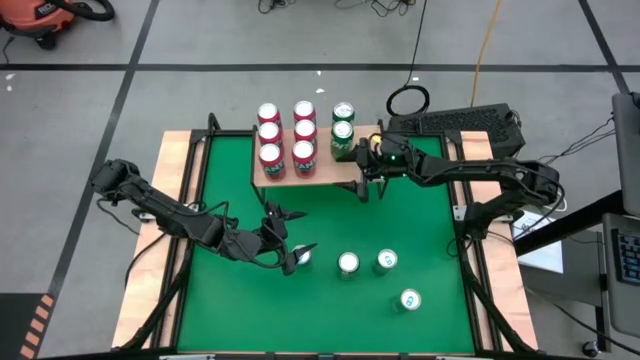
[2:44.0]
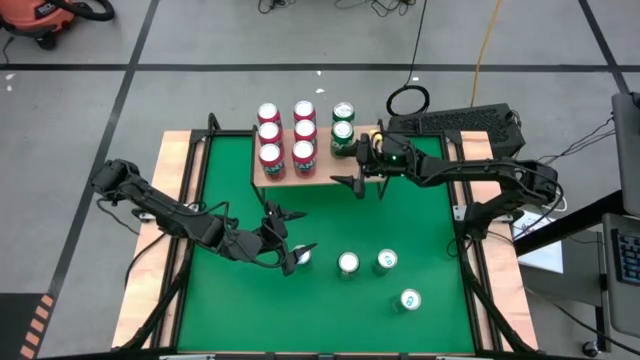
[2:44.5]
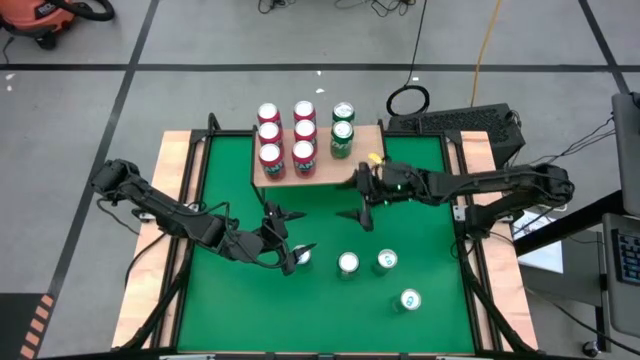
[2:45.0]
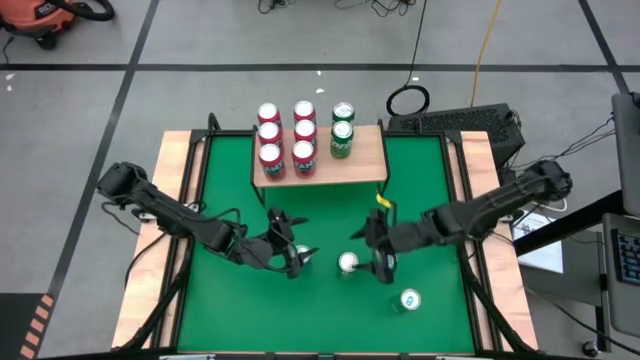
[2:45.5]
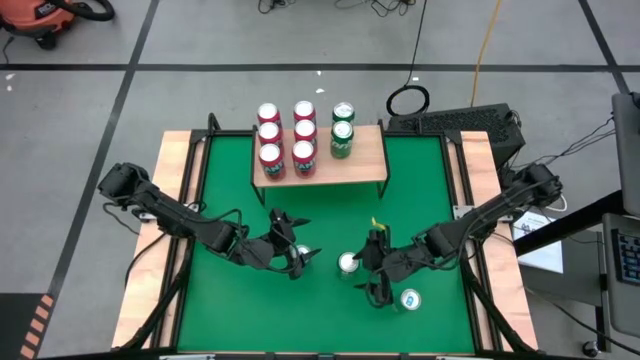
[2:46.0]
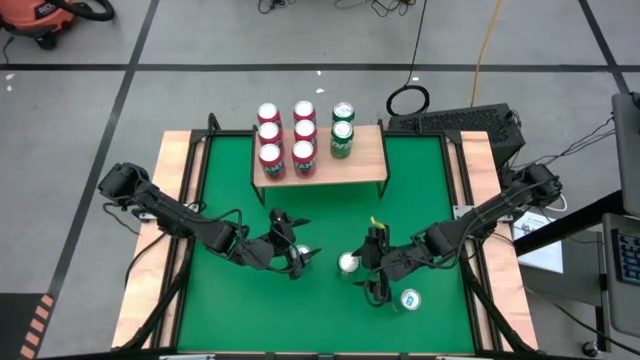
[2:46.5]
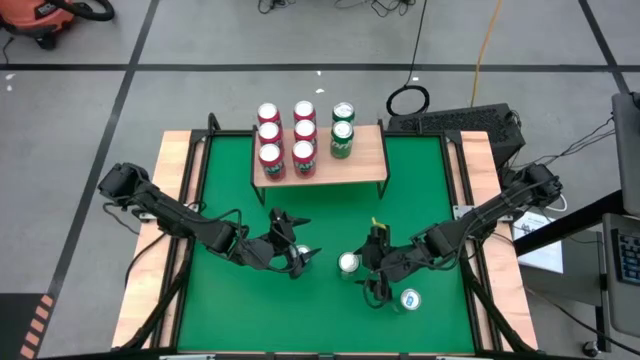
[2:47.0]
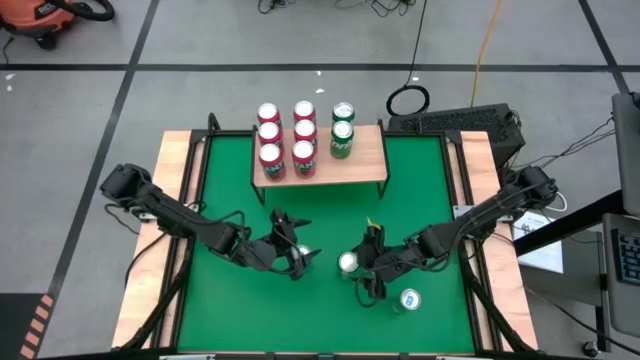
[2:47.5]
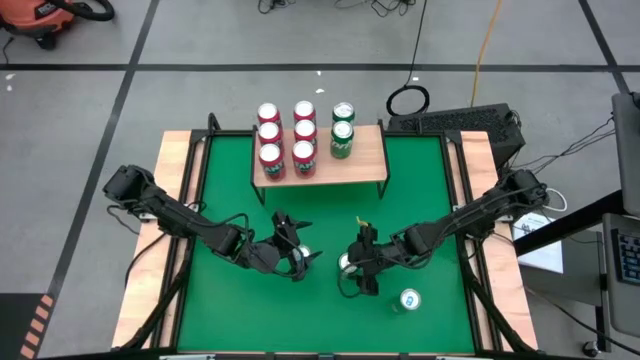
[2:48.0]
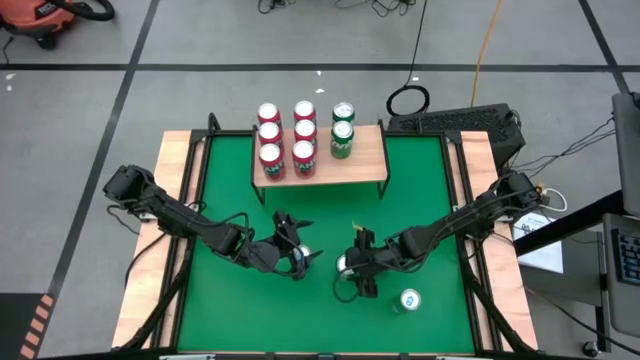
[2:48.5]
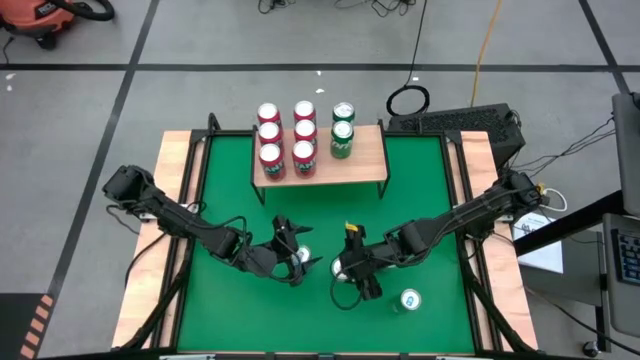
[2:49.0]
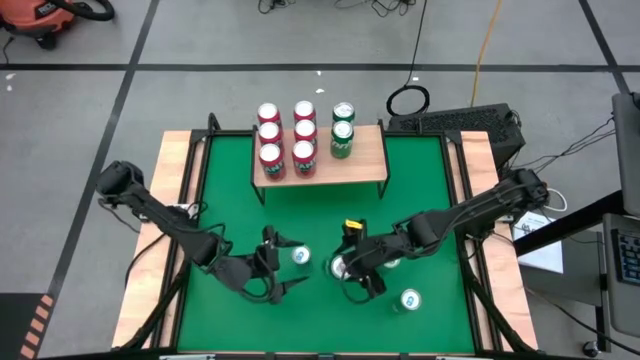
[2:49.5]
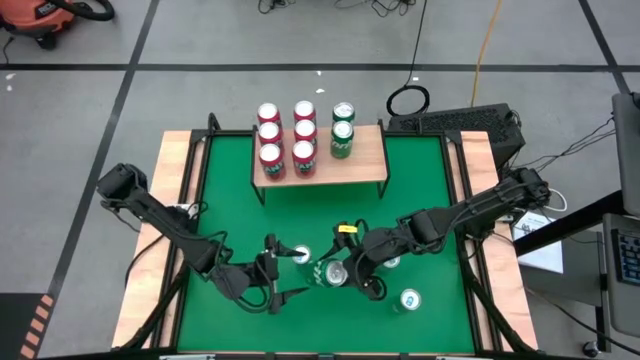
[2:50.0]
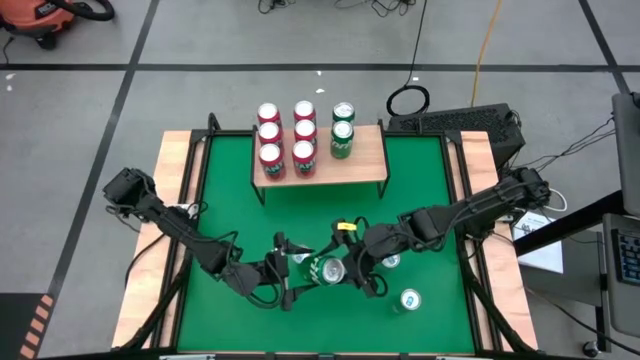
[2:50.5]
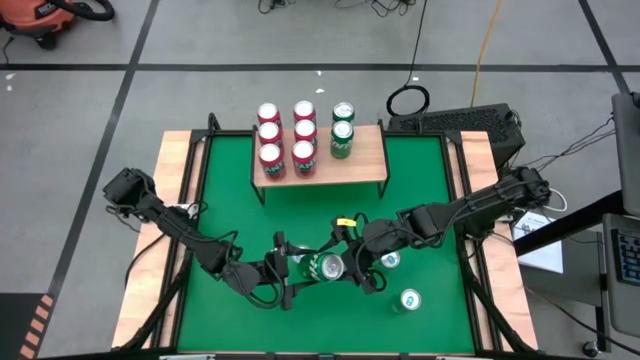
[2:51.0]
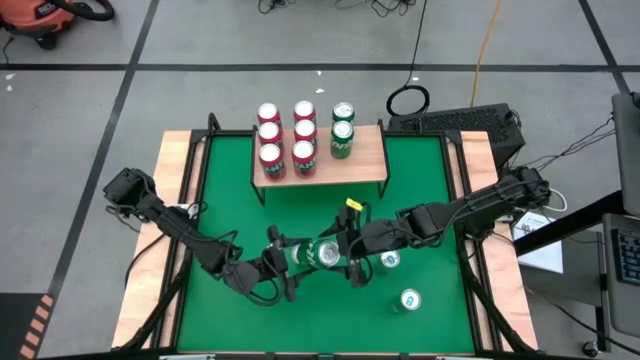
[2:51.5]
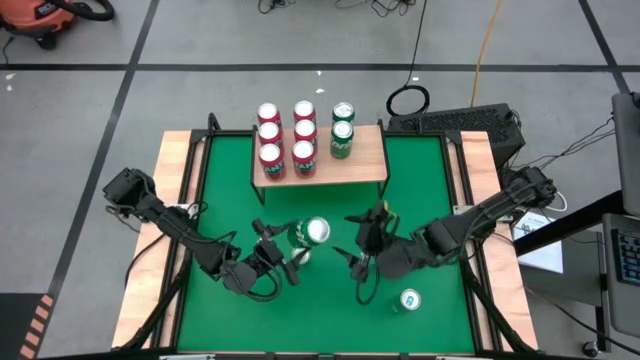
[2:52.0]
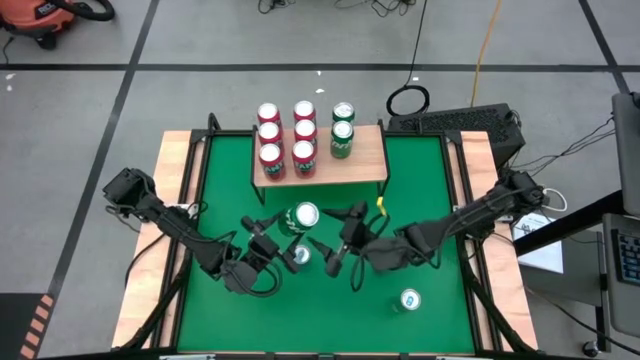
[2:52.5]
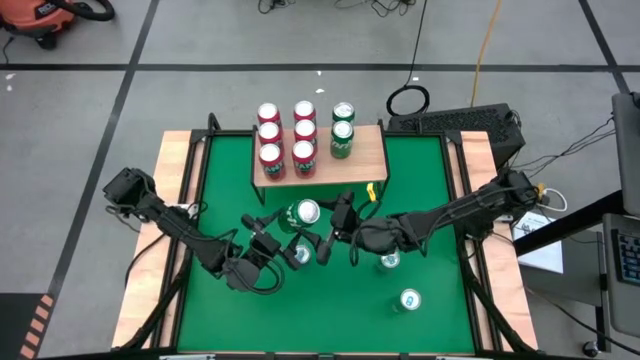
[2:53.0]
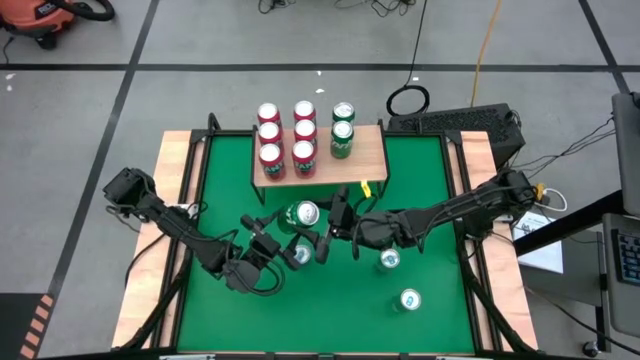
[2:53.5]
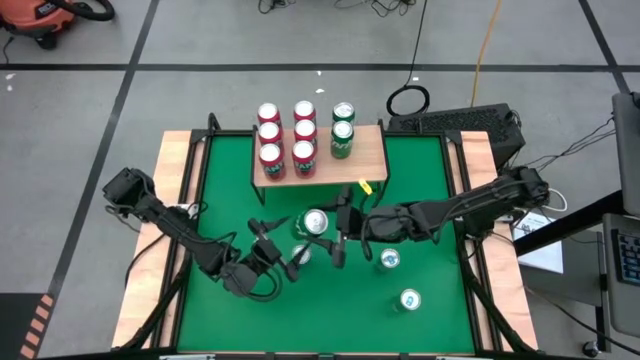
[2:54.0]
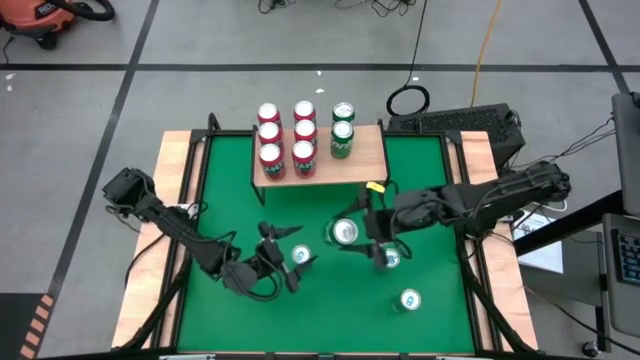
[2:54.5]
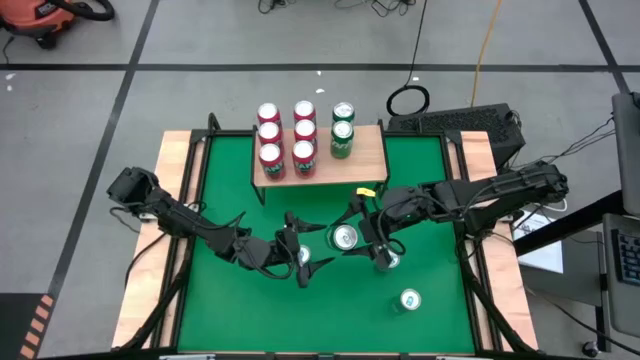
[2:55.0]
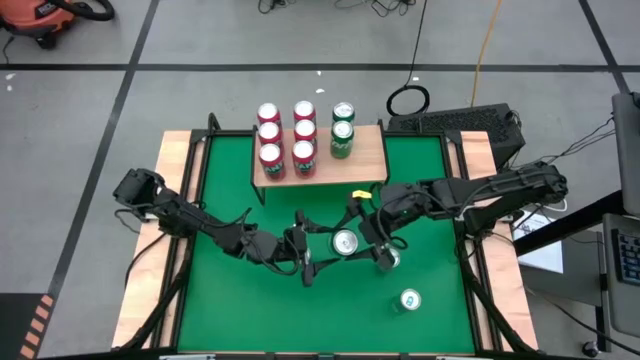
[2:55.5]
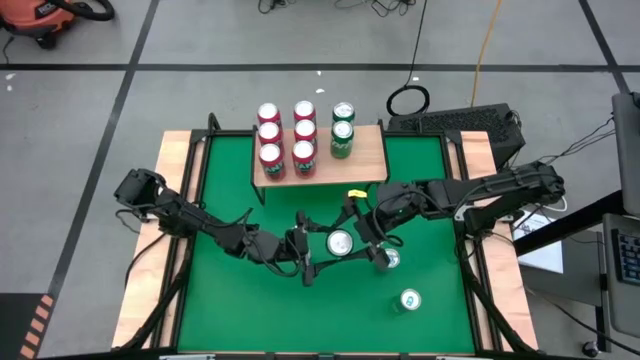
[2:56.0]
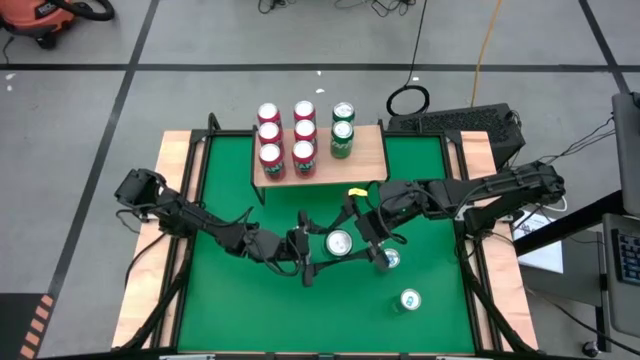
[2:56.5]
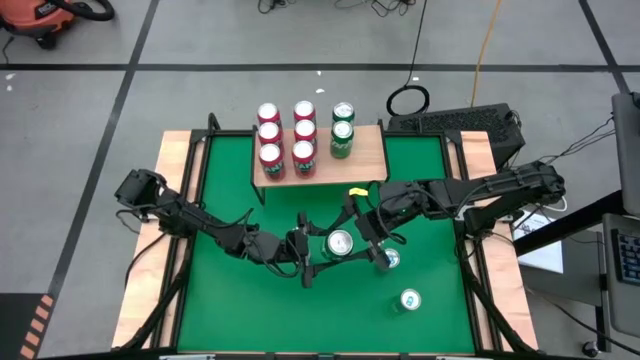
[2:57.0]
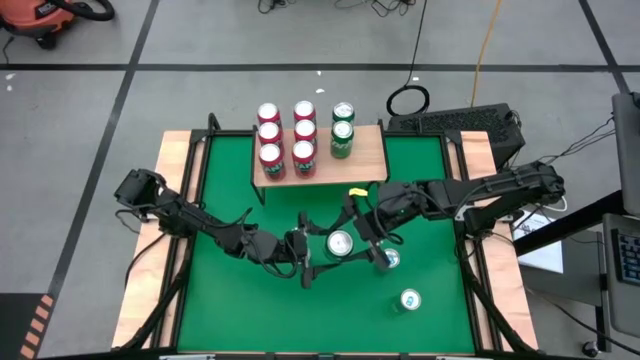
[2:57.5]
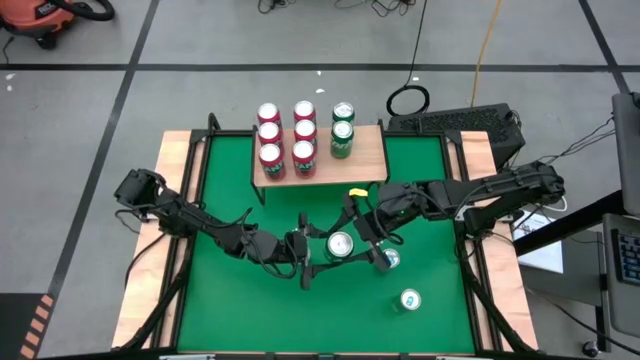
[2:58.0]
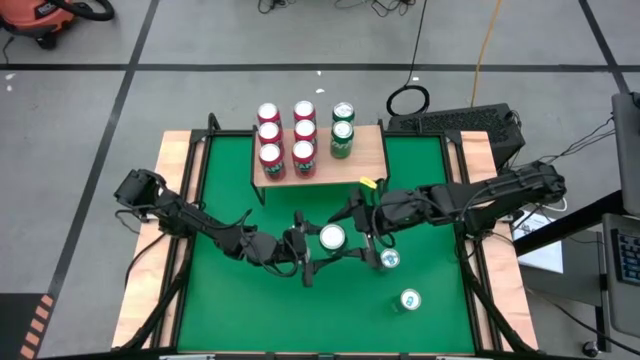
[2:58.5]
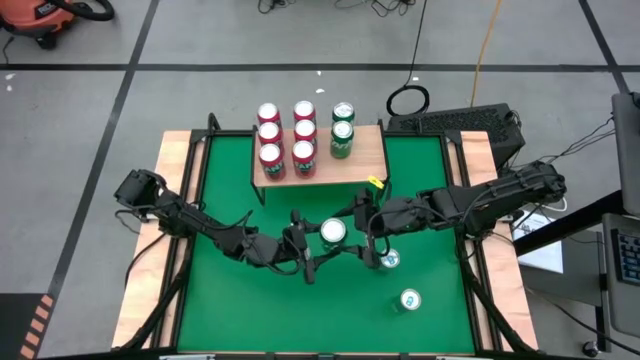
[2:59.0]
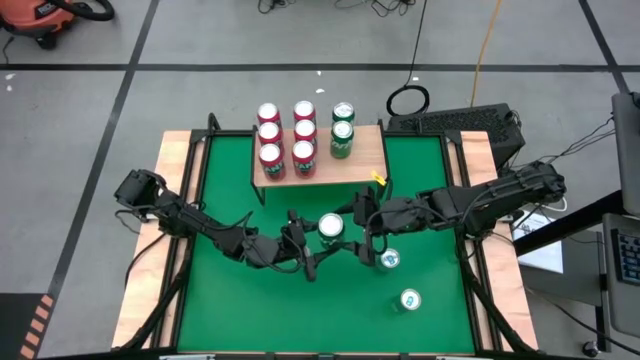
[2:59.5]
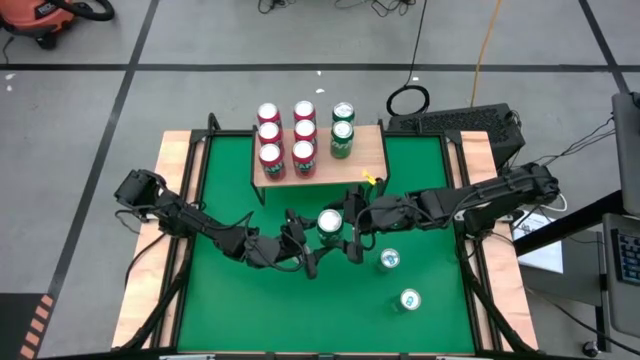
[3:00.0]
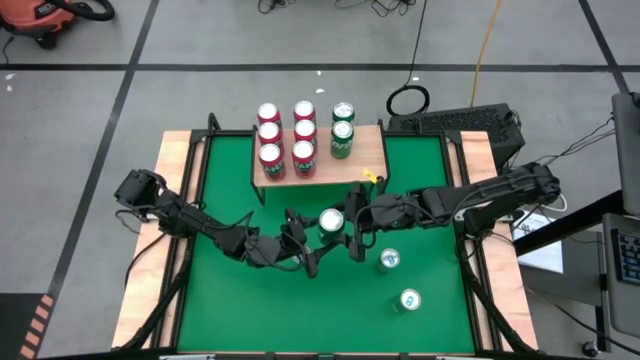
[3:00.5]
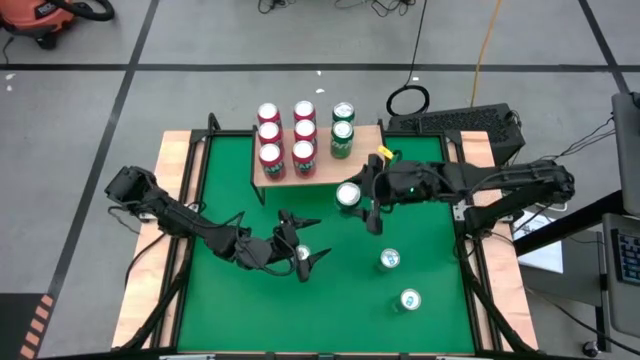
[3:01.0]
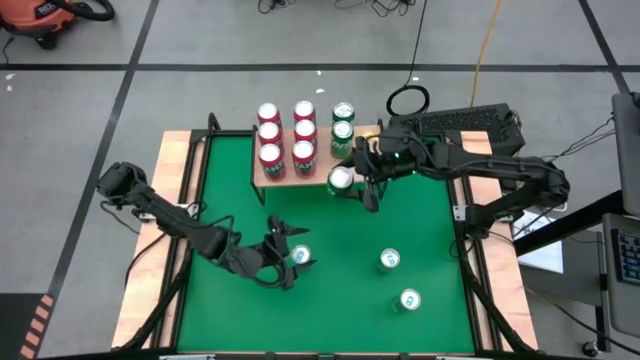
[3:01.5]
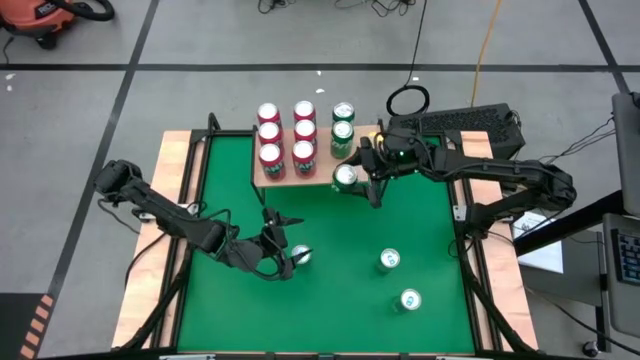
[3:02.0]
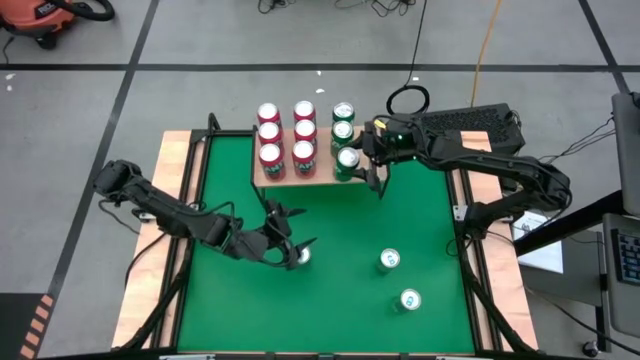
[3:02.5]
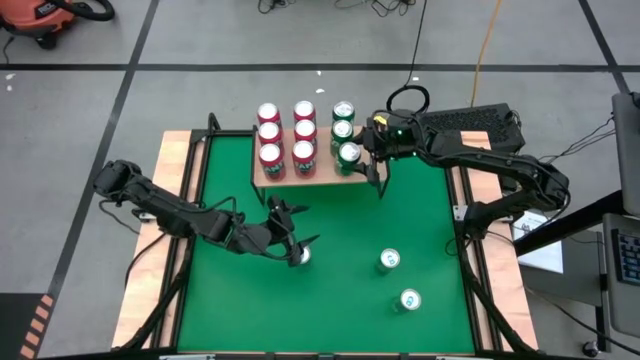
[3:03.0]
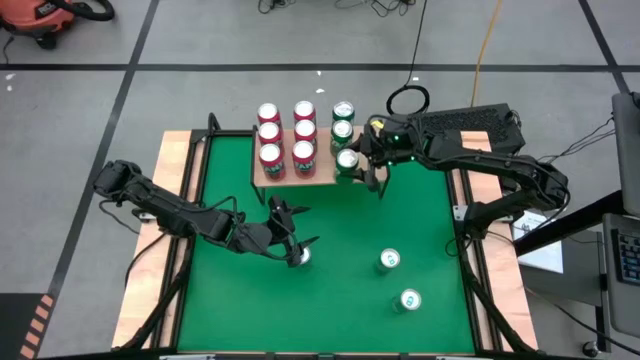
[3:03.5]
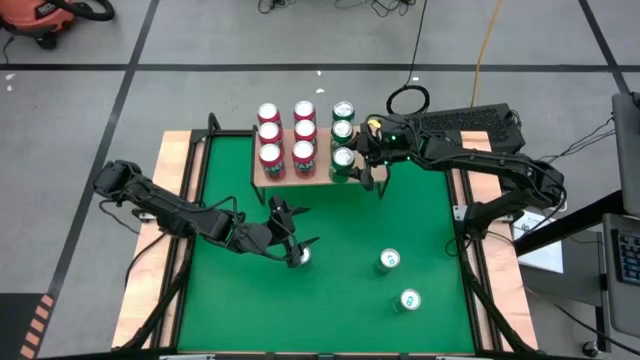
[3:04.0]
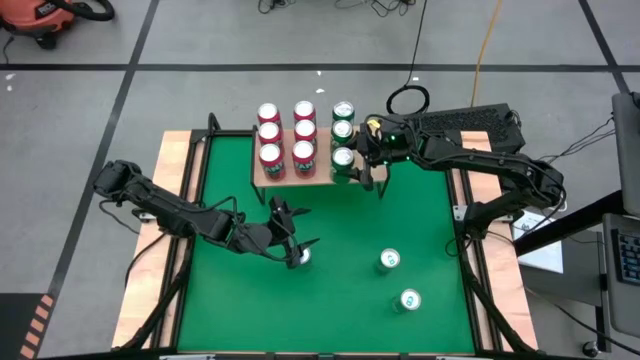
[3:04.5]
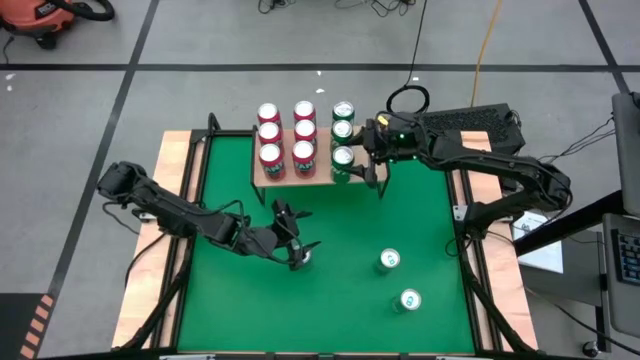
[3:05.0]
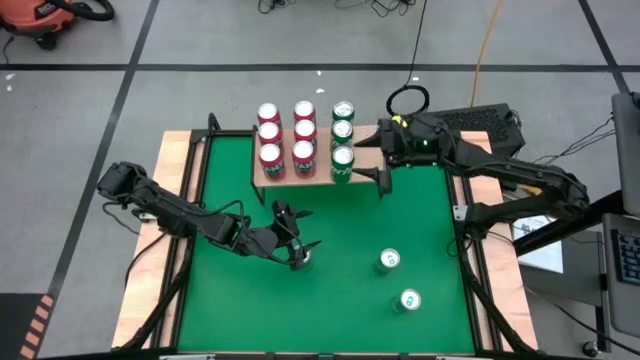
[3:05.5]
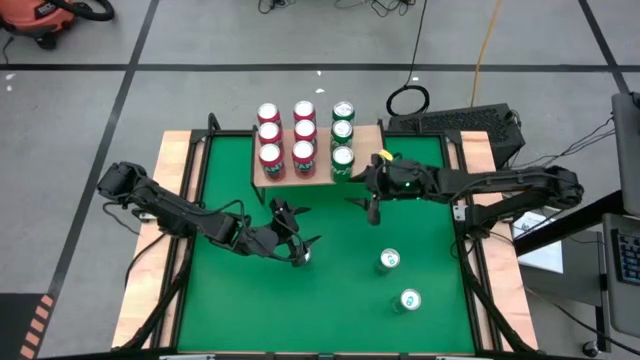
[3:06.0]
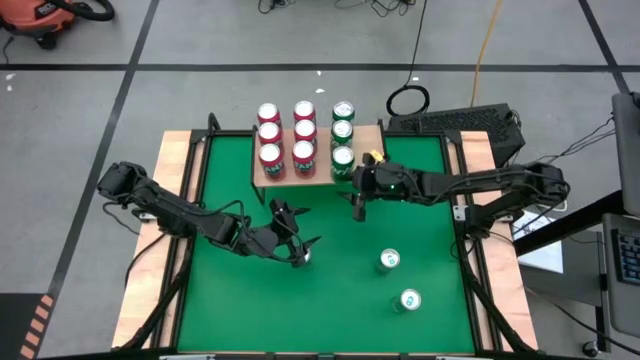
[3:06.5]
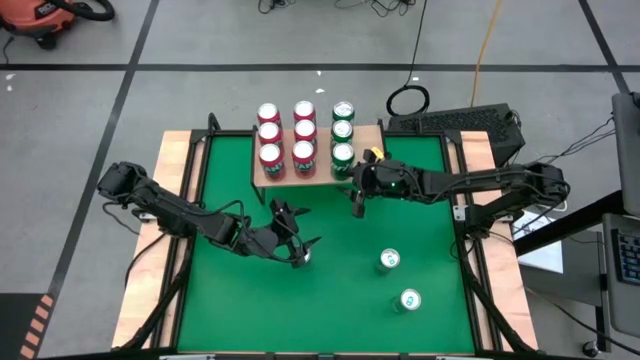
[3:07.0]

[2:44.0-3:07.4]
Task: Place canned beverage on shelf
Put the green soda can on the shelf aligned with the other green soda cans
